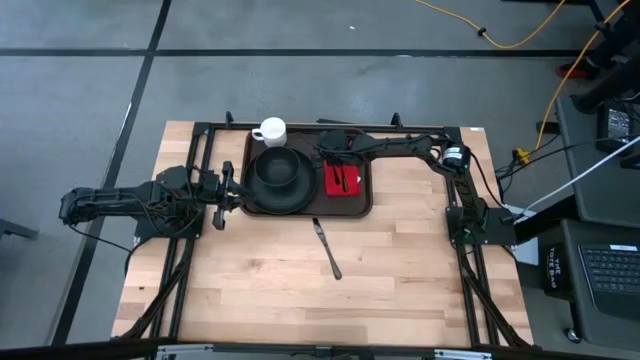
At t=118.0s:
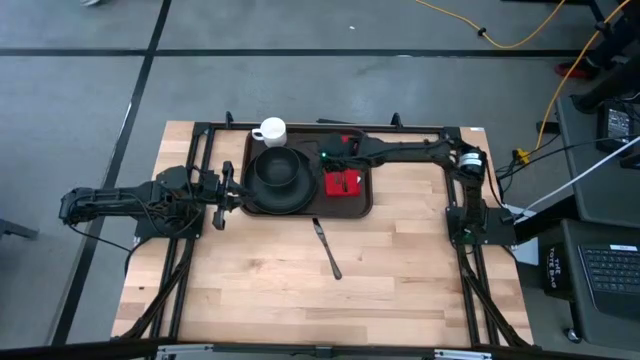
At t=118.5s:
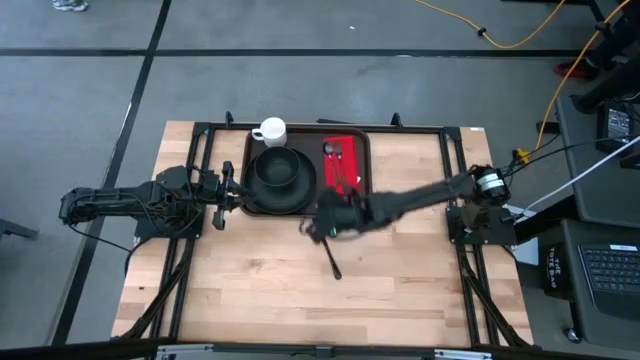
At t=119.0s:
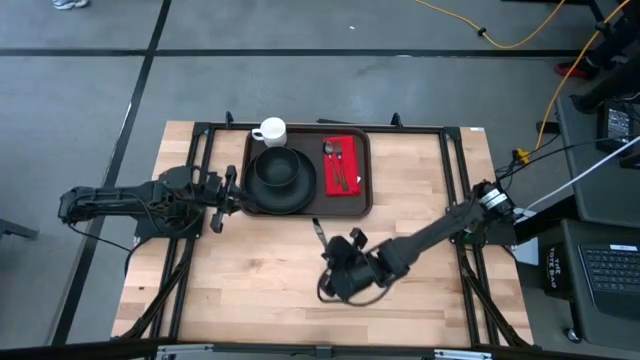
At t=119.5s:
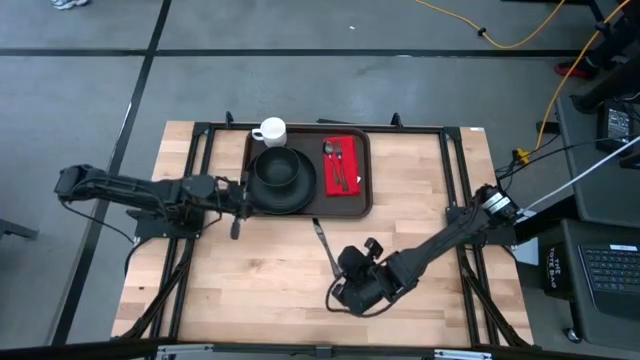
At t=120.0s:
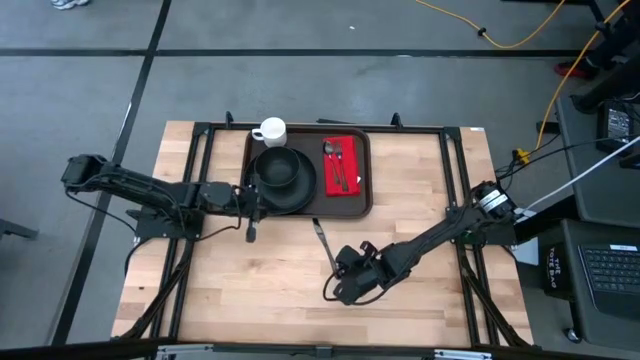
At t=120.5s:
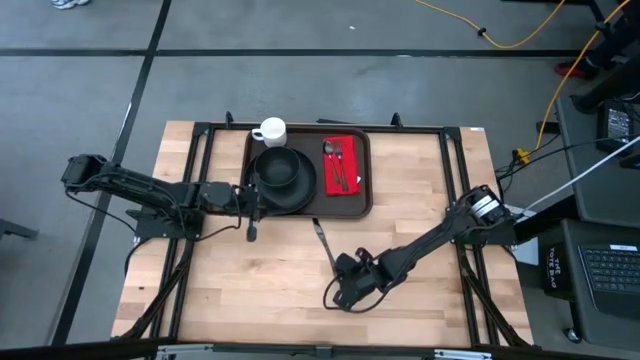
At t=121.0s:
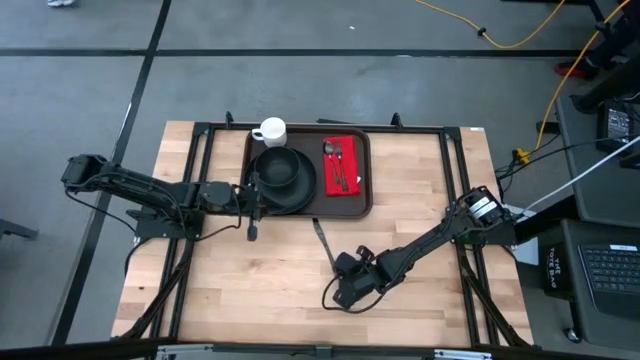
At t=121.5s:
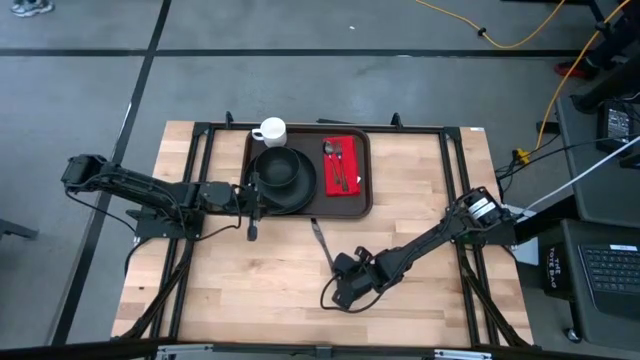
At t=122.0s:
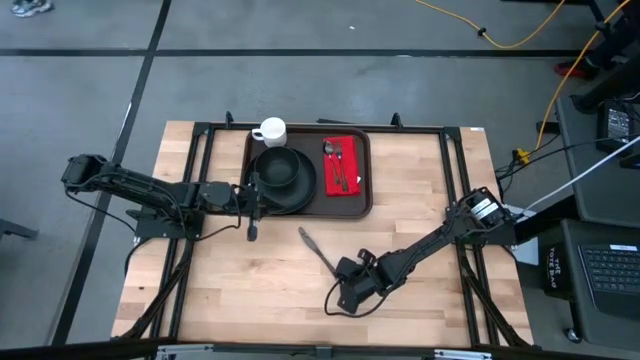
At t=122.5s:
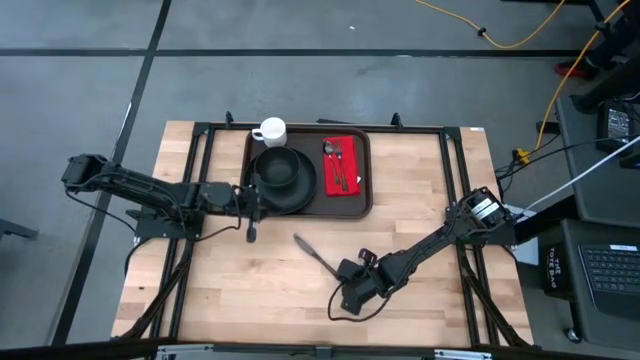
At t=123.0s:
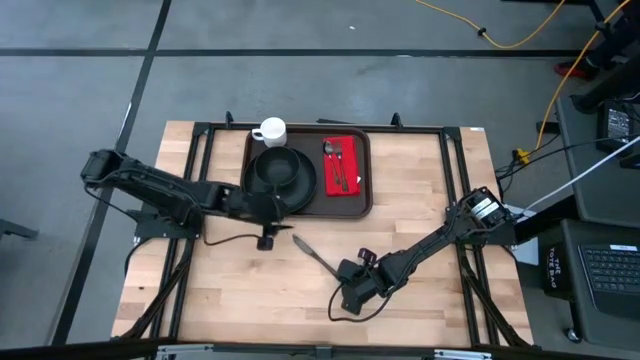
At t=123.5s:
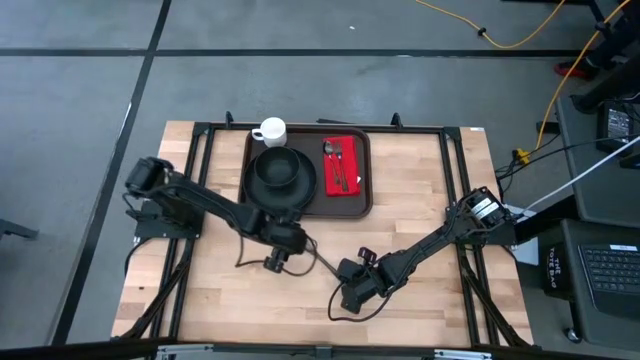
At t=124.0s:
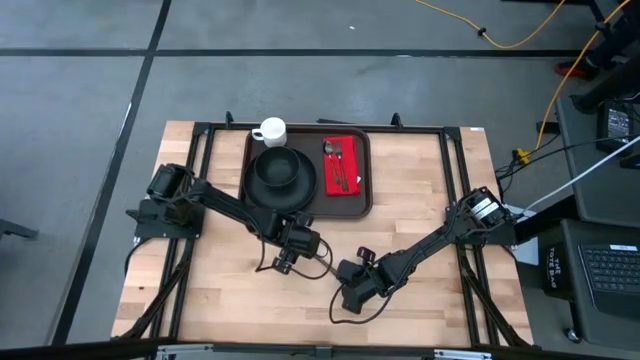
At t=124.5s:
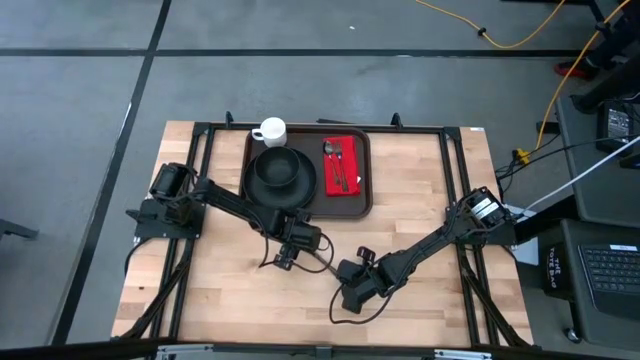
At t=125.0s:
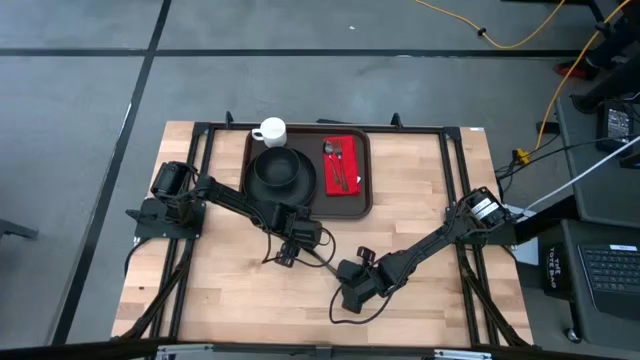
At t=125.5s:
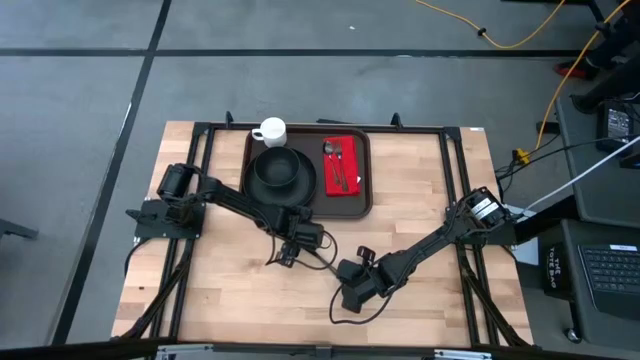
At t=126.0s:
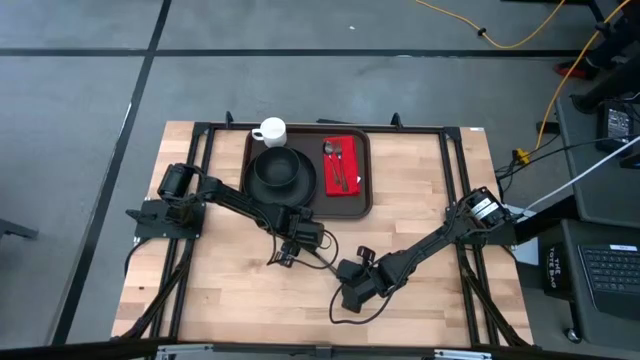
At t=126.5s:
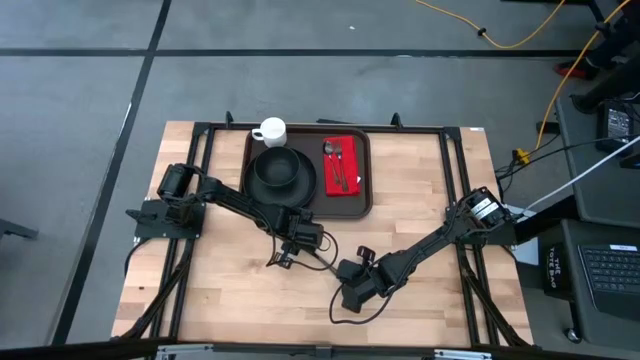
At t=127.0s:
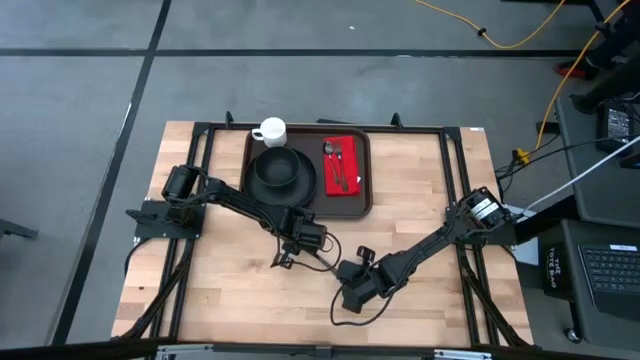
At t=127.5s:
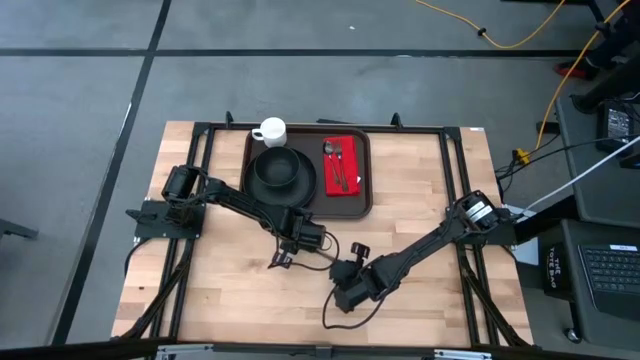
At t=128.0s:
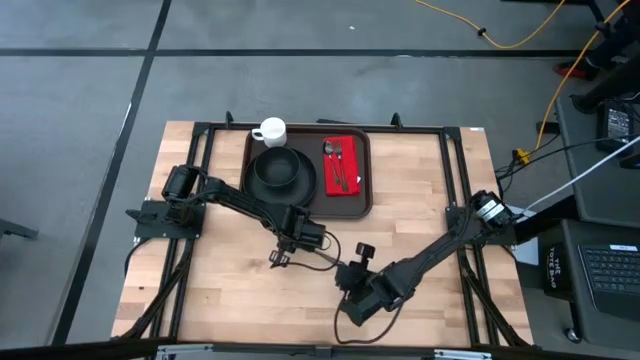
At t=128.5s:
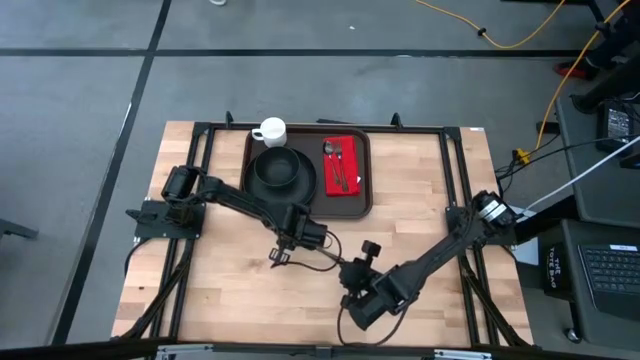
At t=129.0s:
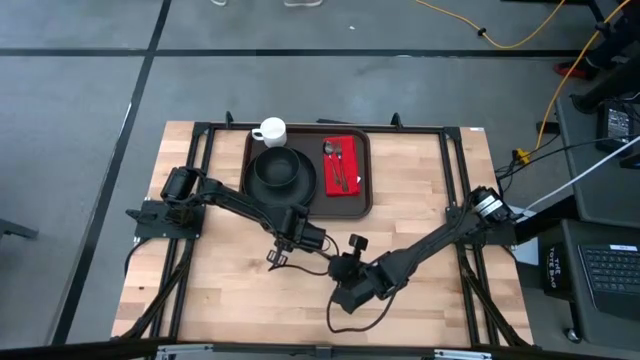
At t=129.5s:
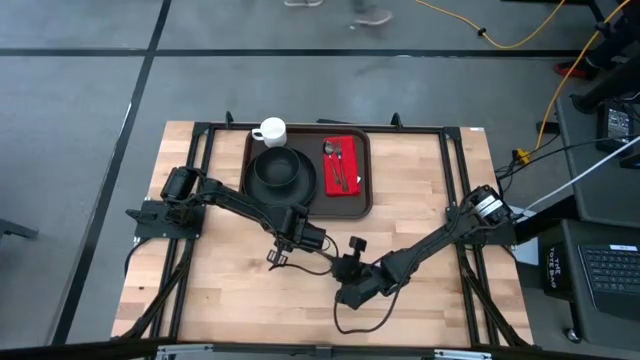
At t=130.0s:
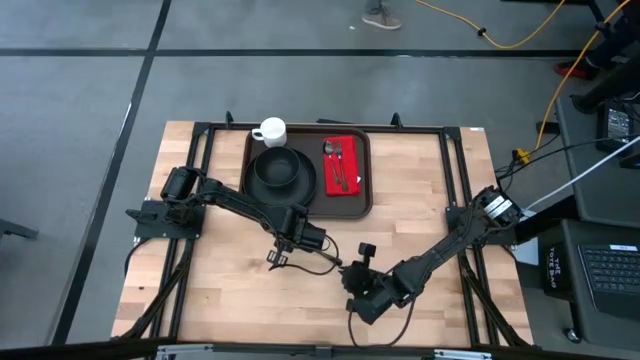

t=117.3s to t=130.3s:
Task: Set up tray
Put the silver knife on the red napkin to the right of the silver fork

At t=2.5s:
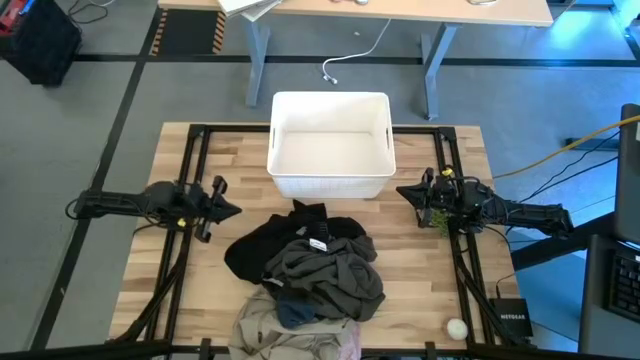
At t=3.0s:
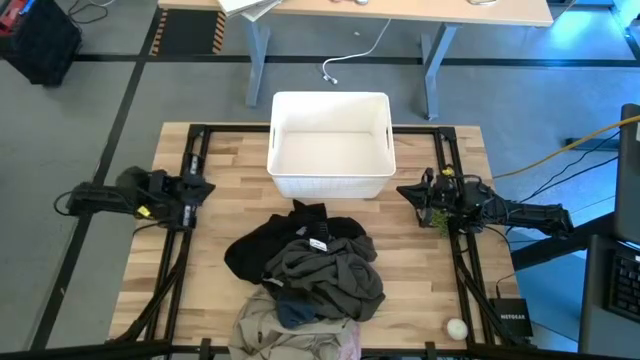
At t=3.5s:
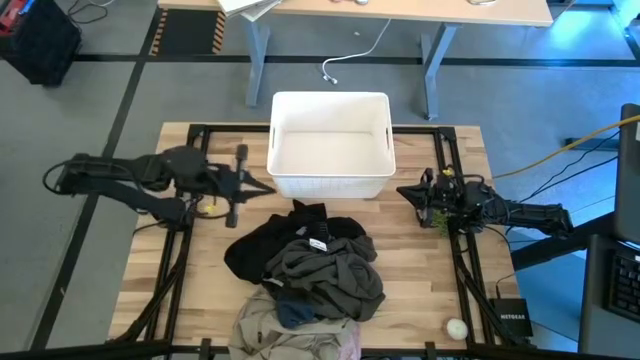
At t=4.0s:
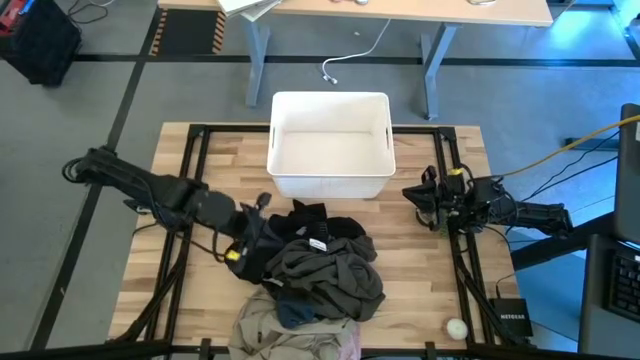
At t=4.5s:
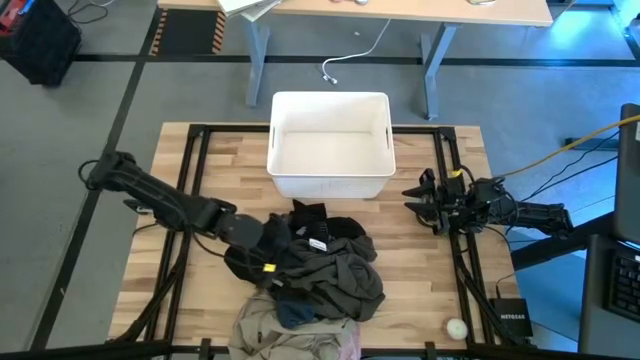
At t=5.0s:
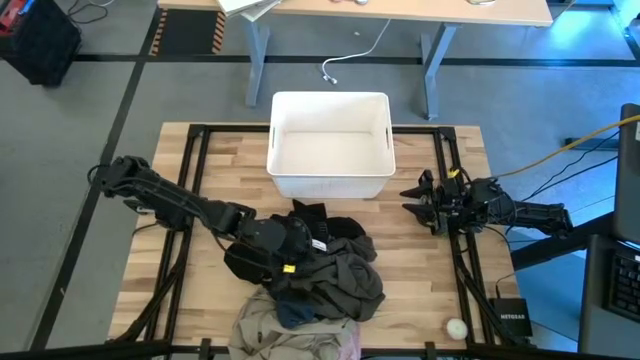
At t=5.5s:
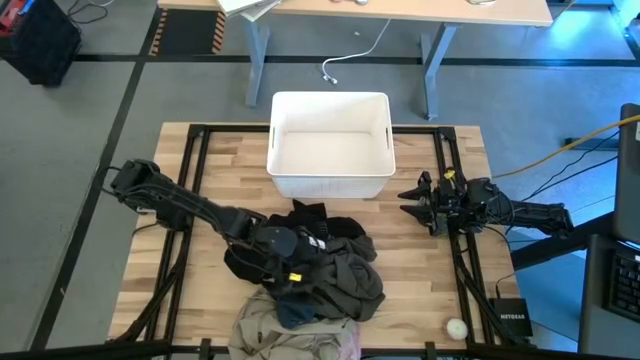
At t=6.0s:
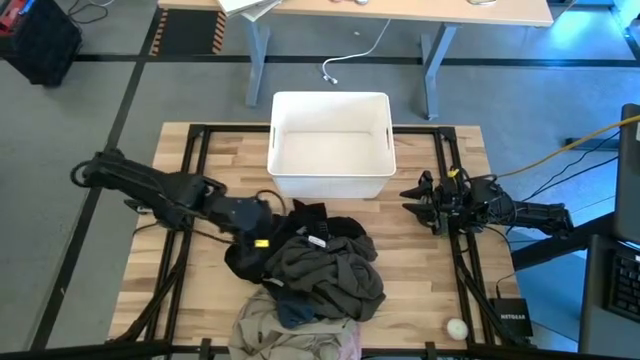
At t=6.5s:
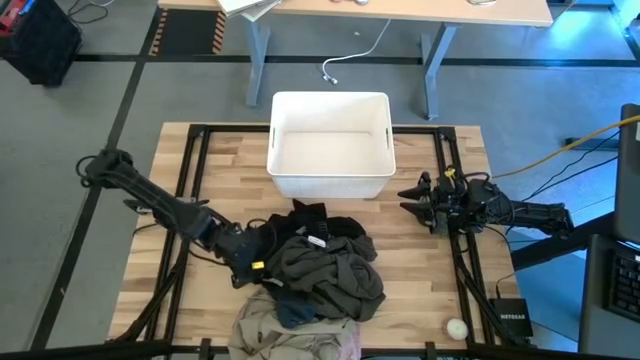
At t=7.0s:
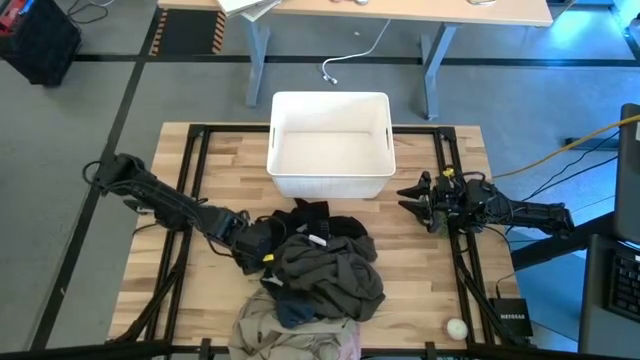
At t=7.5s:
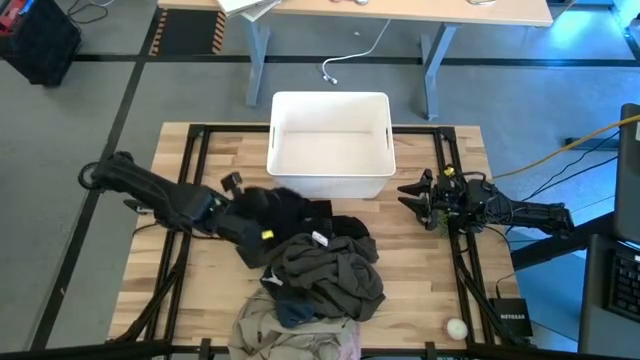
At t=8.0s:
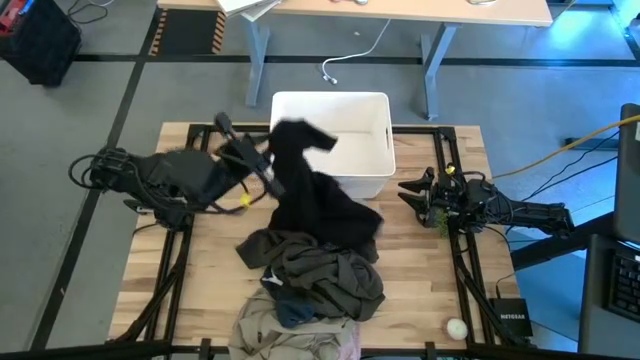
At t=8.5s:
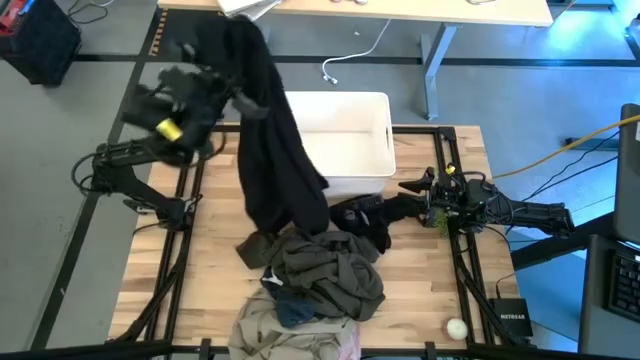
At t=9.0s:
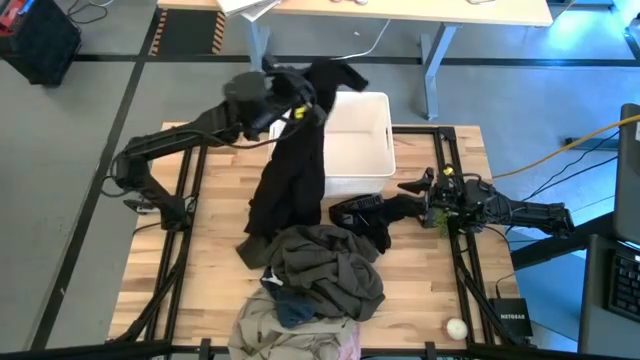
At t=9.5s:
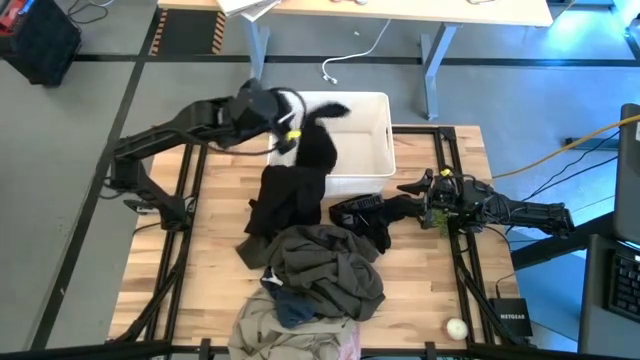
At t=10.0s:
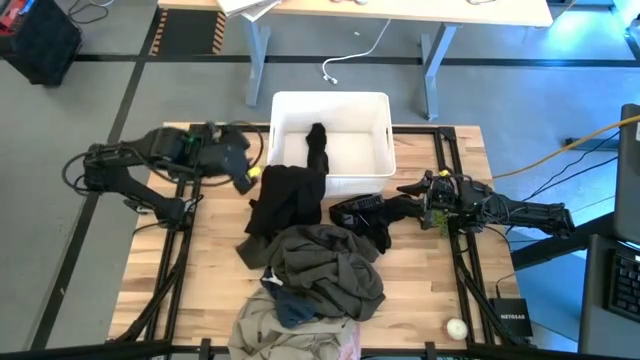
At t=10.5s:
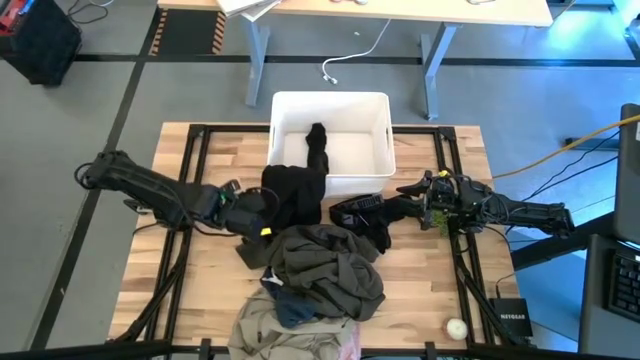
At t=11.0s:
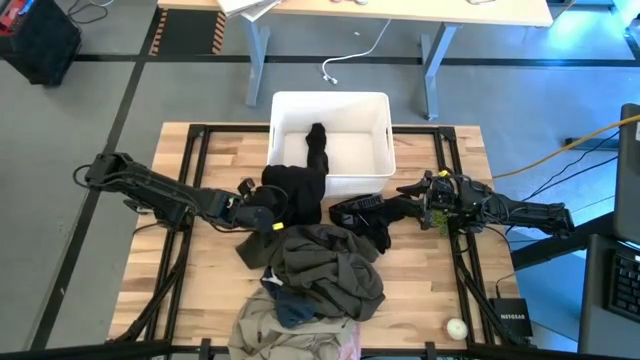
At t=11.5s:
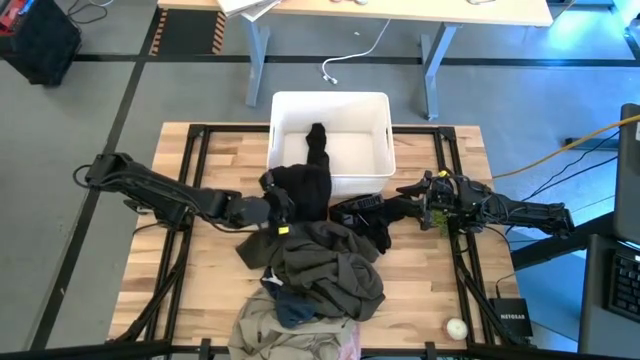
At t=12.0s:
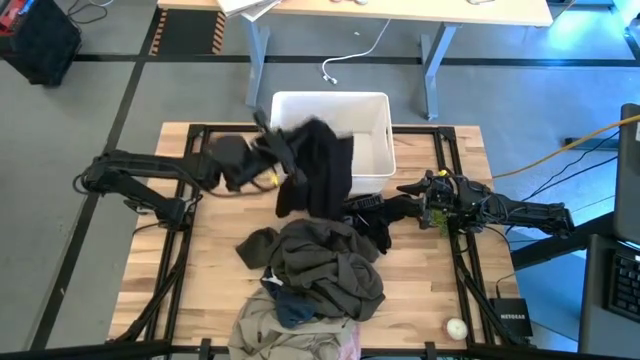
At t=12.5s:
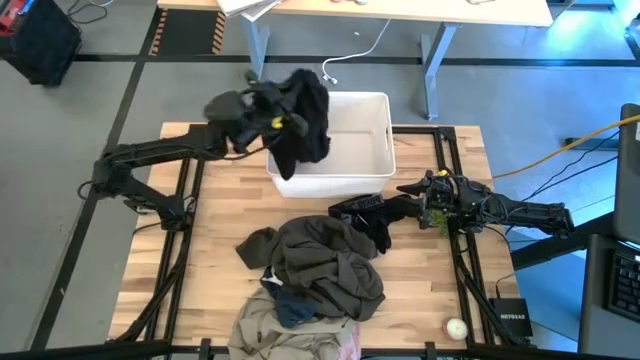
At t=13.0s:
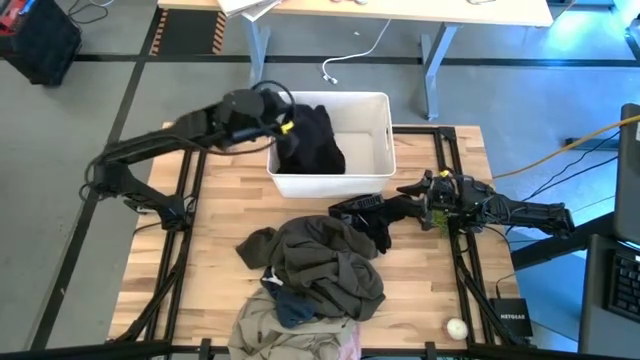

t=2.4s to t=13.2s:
Task: Sort clothes
Put the black jacket into the white bin
